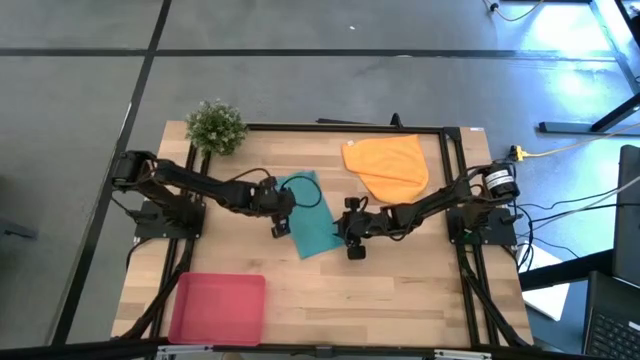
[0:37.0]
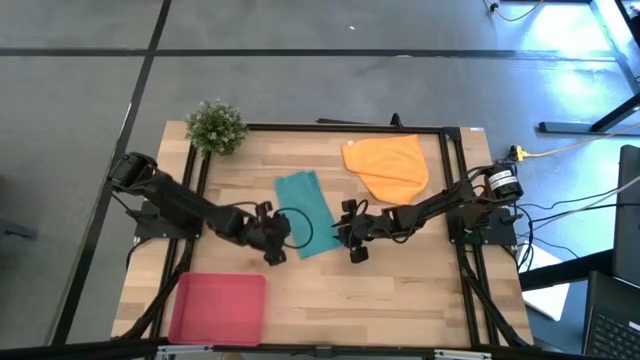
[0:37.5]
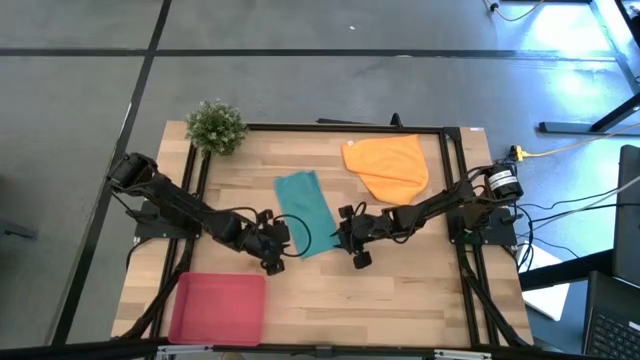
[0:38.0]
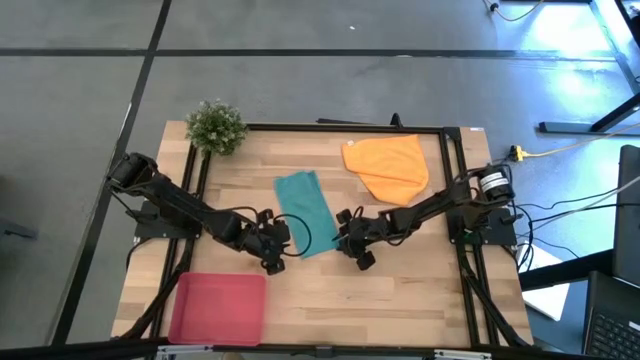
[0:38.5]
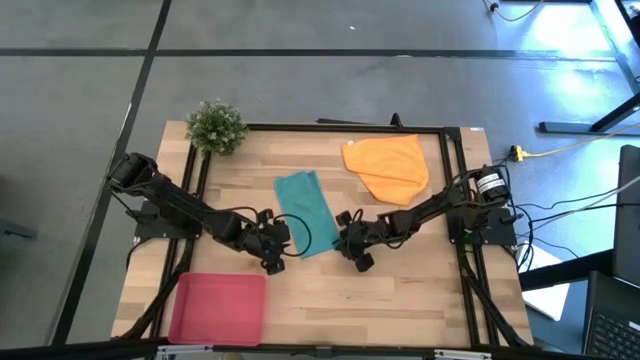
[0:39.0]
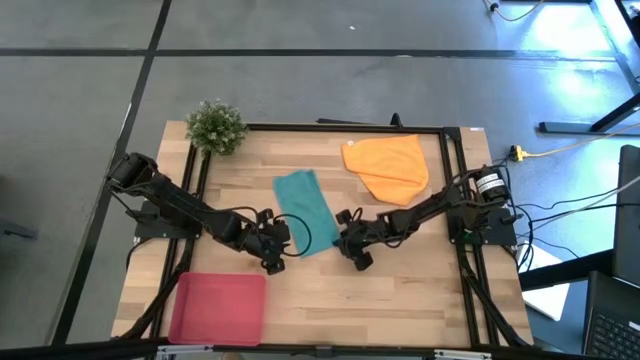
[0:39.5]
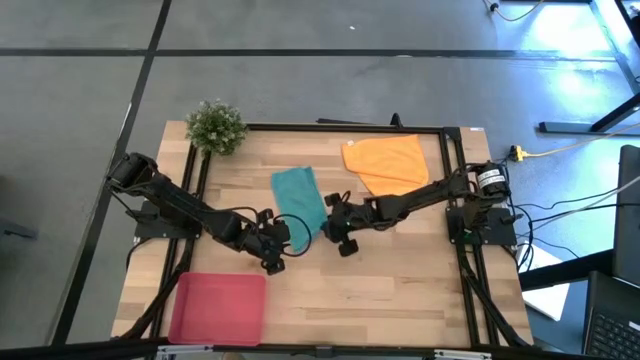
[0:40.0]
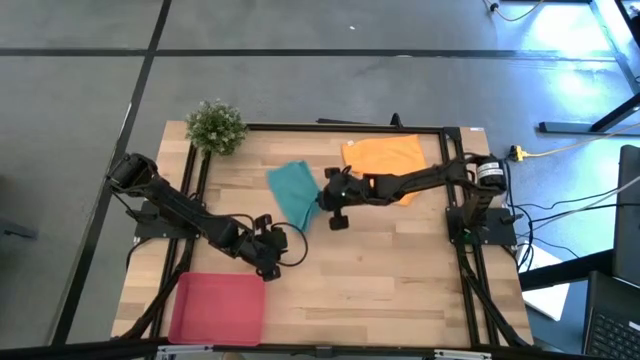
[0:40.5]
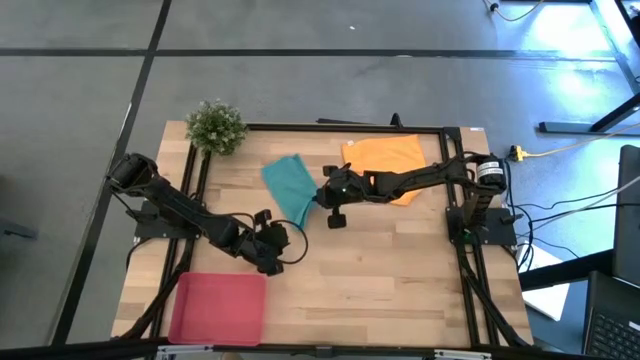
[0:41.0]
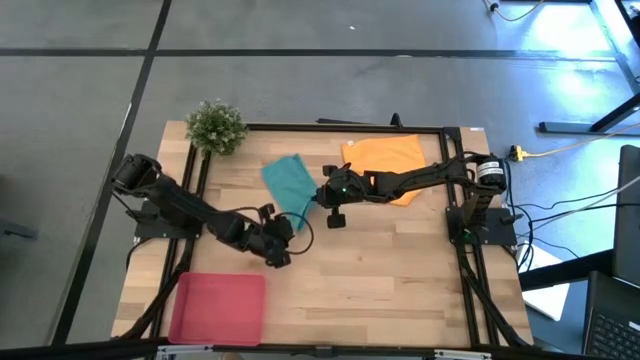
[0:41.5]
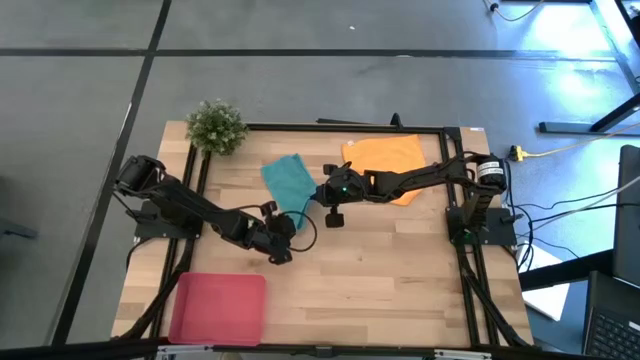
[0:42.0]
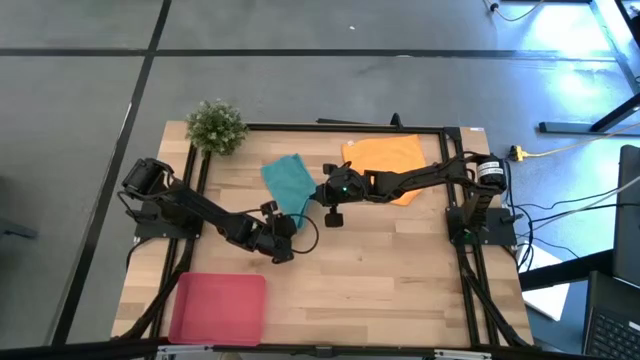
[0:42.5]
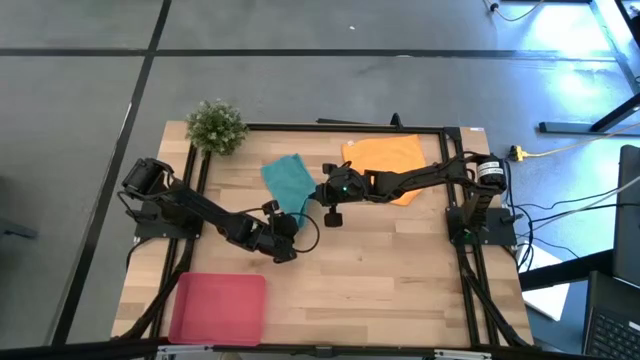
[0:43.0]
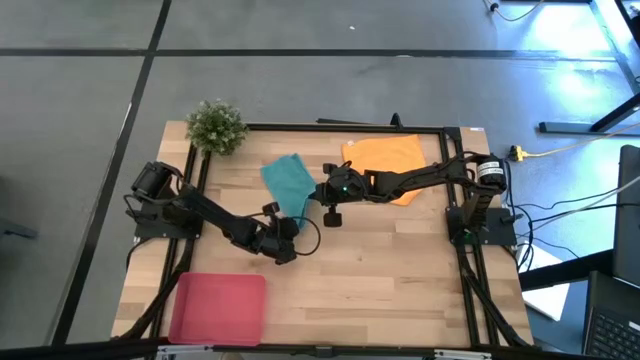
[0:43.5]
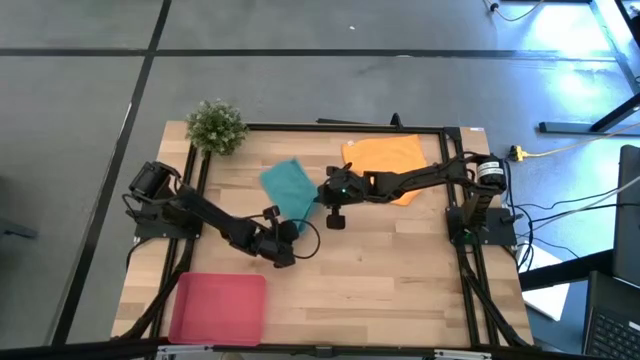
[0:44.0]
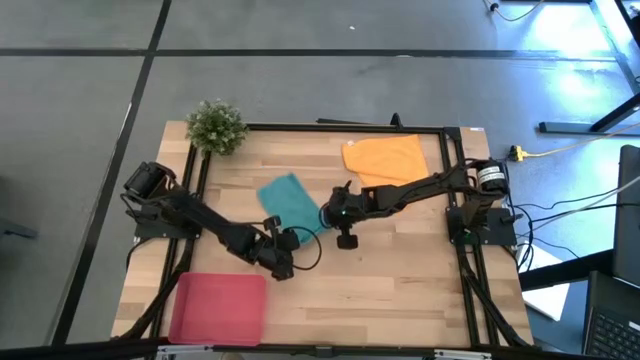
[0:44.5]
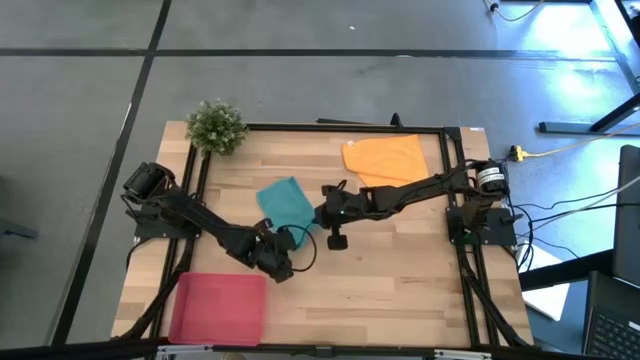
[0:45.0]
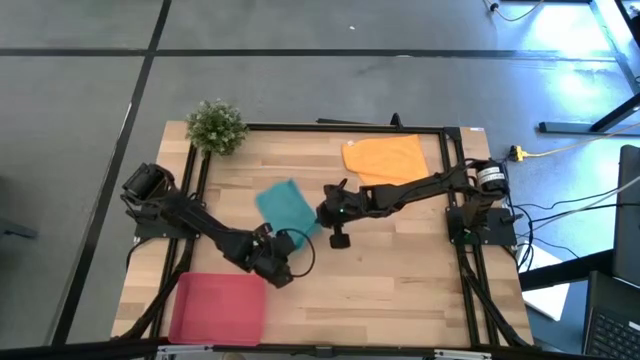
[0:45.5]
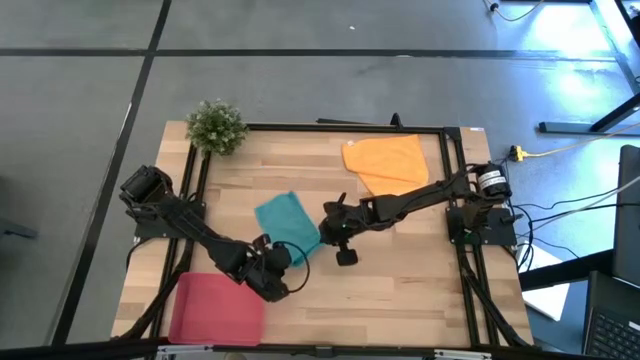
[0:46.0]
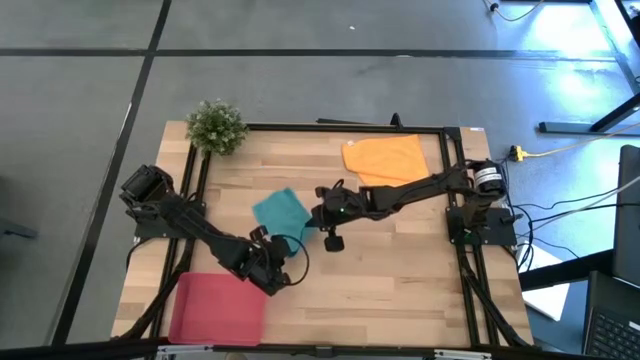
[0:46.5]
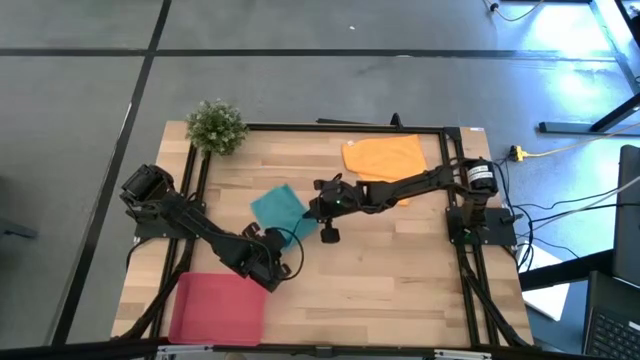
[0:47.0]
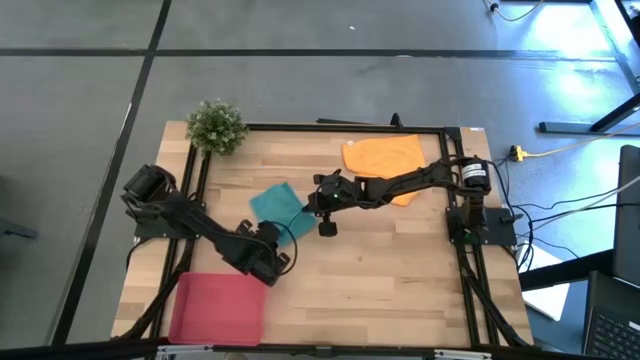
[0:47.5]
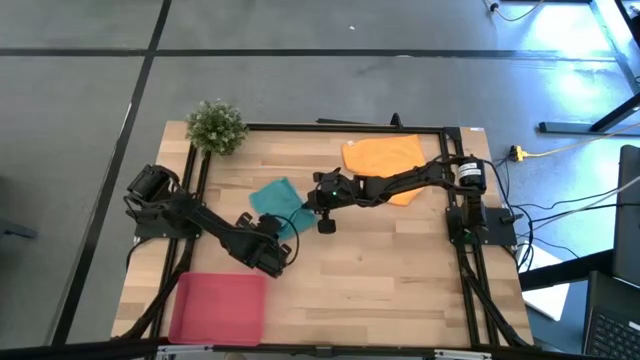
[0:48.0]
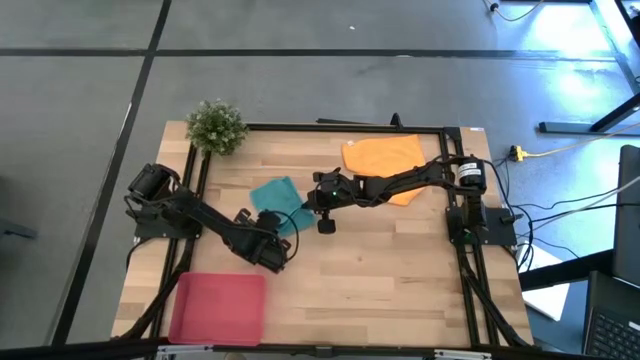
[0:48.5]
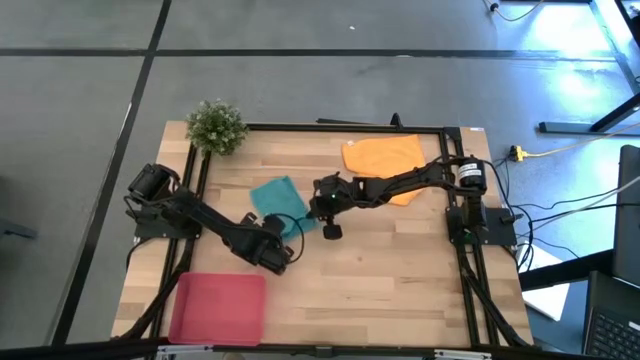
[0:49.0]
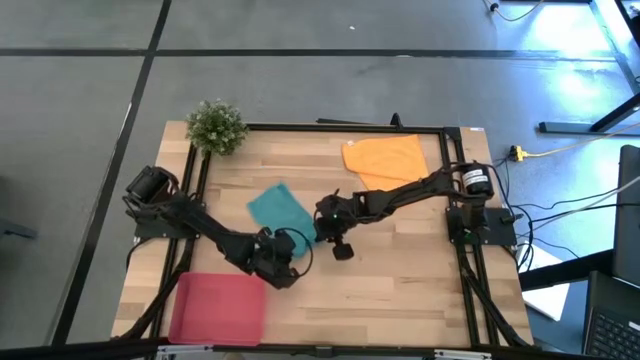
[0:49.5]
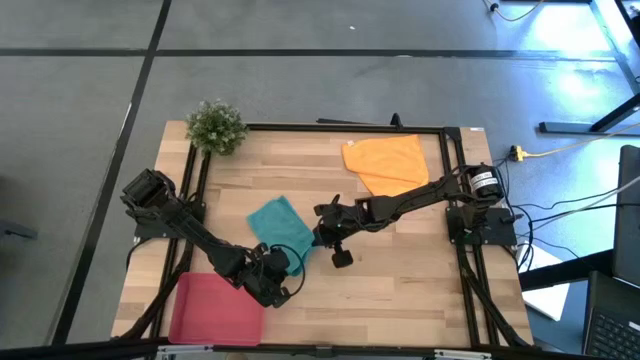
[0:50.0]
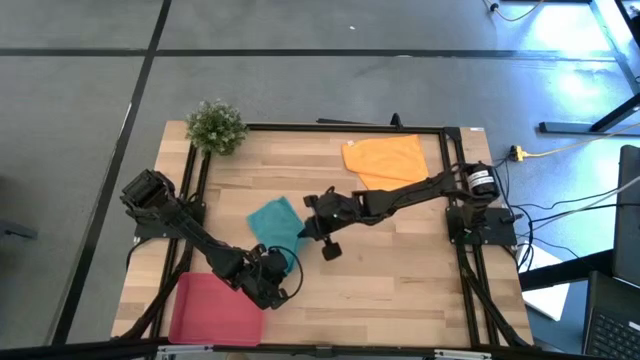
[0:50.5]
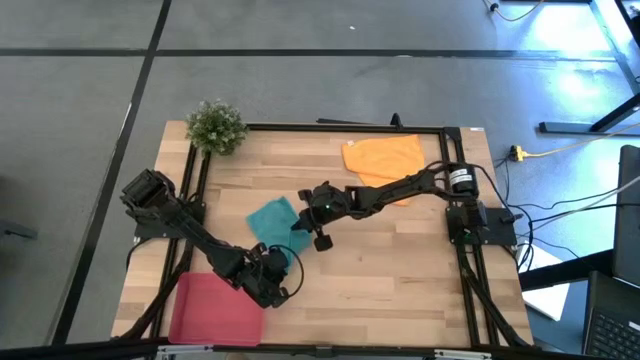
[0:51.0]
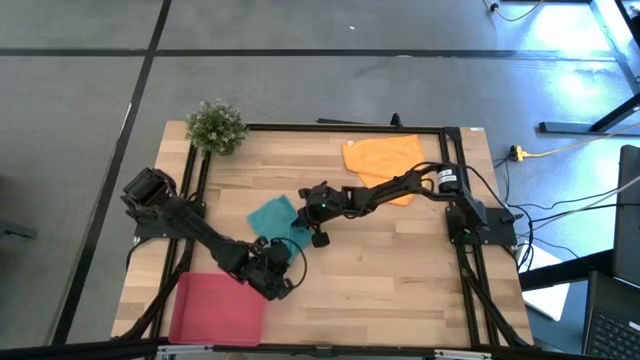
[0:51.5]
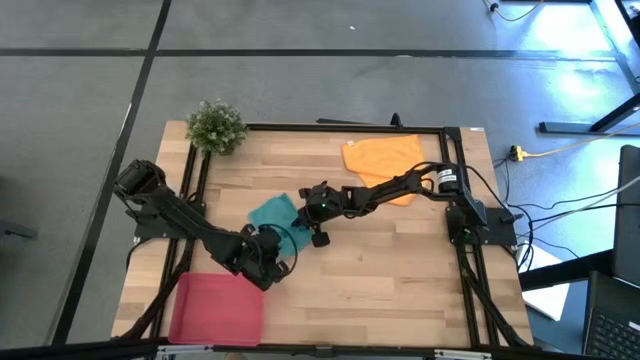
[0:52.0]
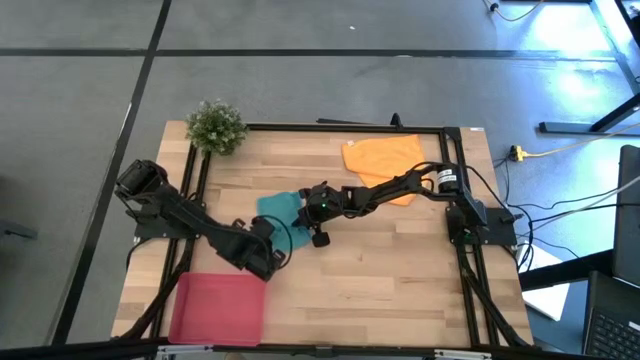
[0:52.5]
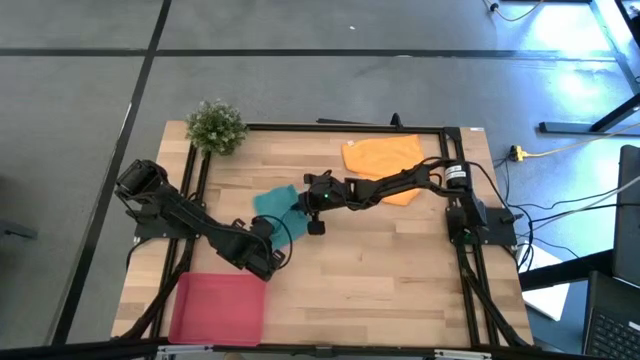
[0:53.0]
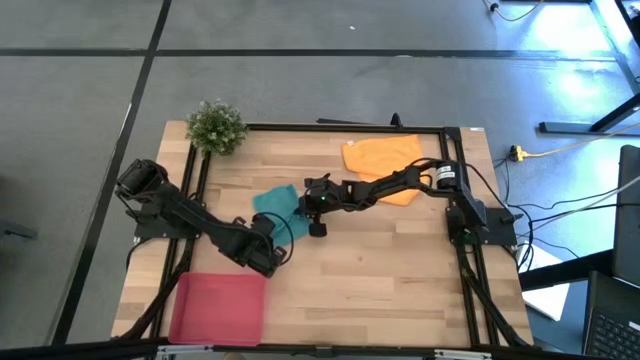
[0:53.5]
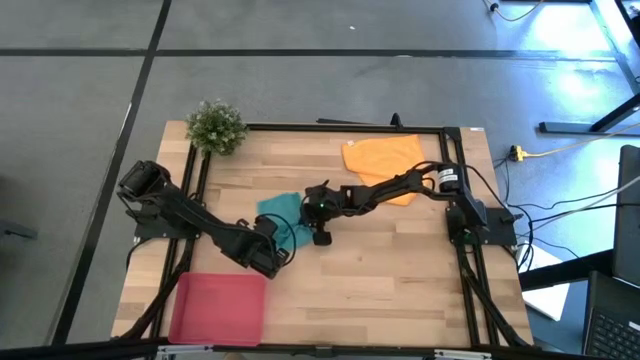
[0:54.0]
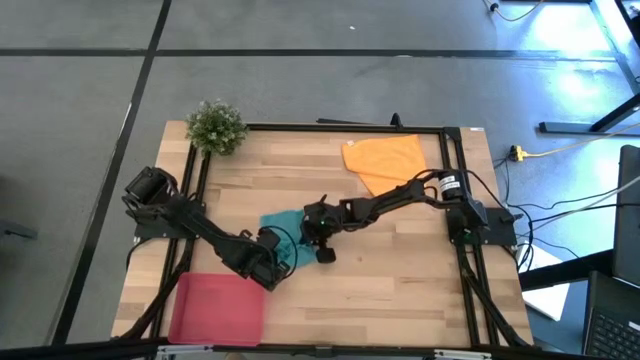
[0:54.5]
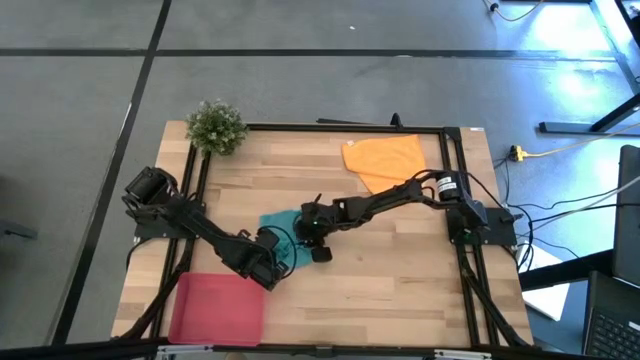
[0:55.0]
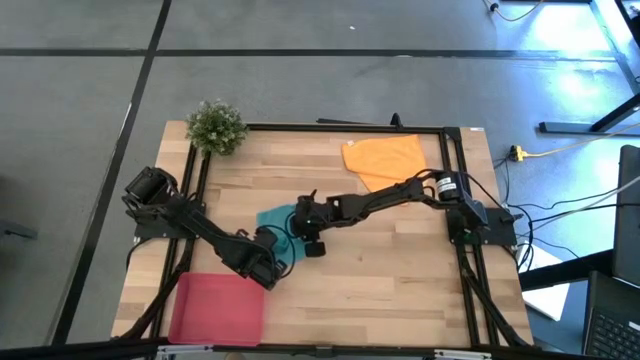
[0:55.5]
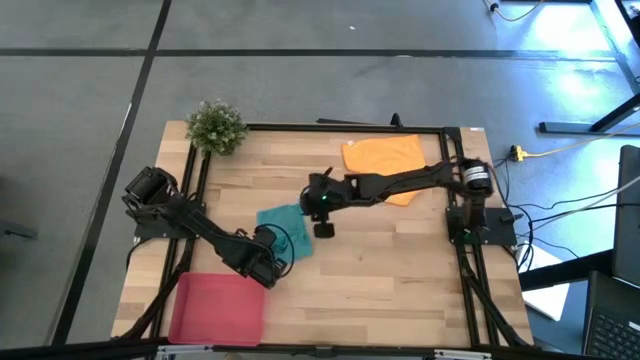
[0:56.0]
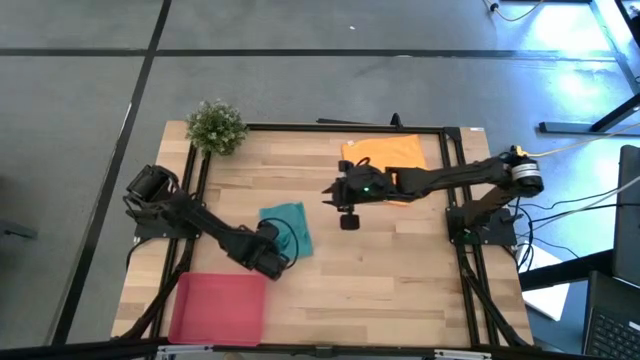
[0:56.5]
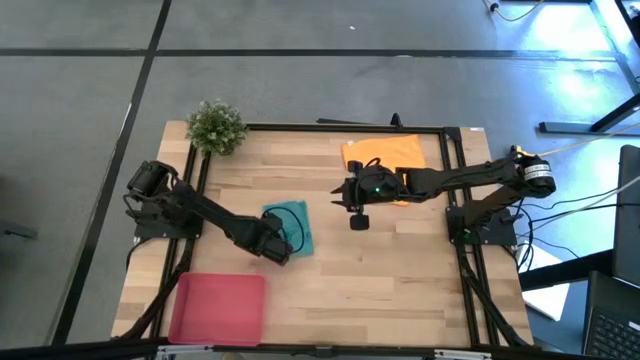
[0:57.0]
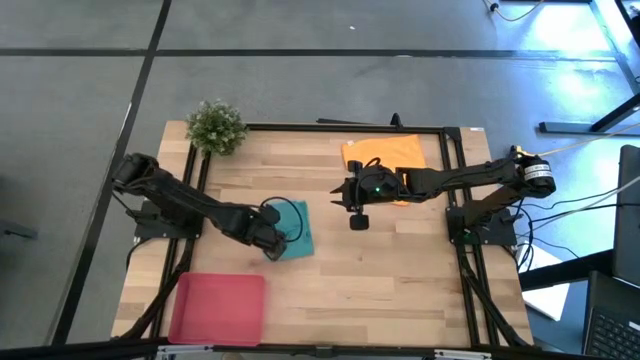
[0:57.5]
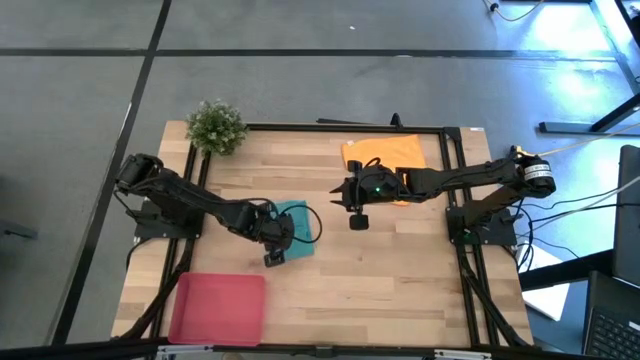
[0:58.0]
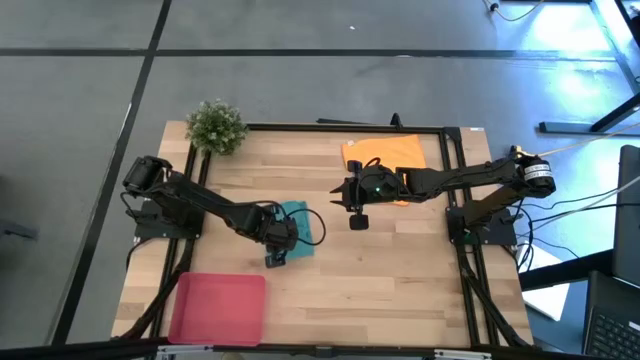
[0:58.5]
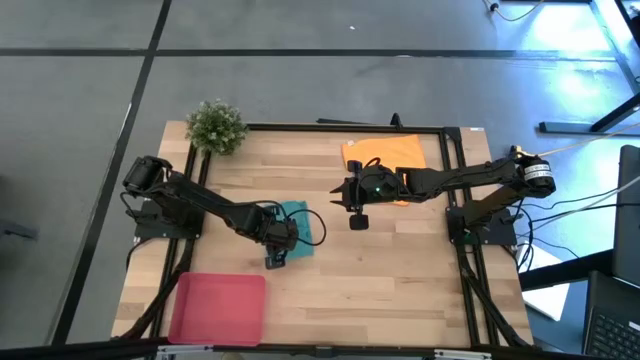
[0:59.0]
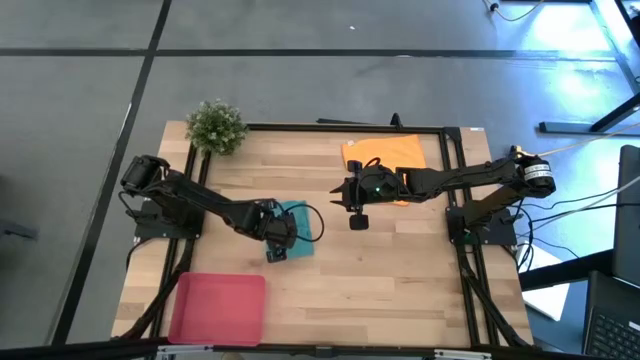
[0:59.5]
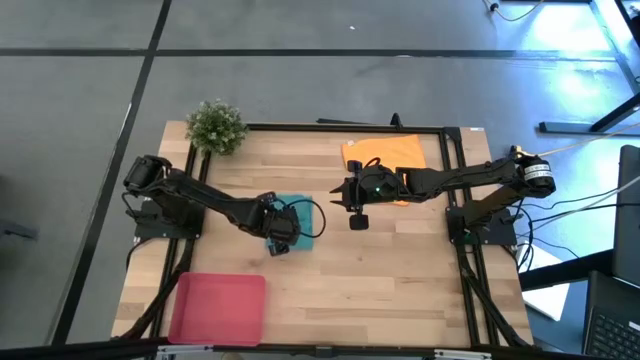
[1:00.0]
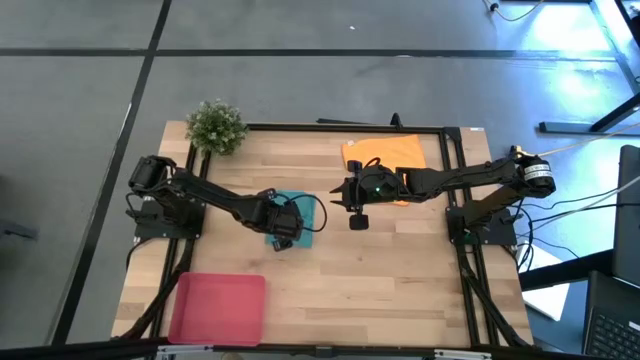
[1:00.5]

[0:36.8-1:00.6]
Task: Roll microfiber towels into tight, uniform cylinder then place into a basket
Roll the blue microfiber towel
